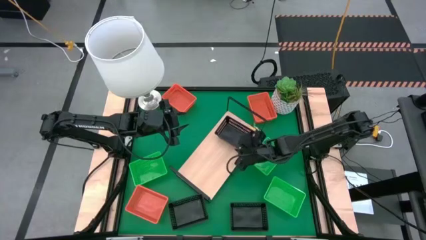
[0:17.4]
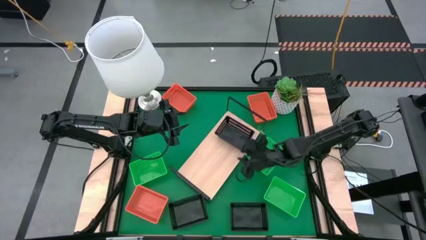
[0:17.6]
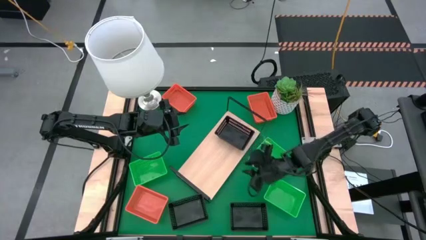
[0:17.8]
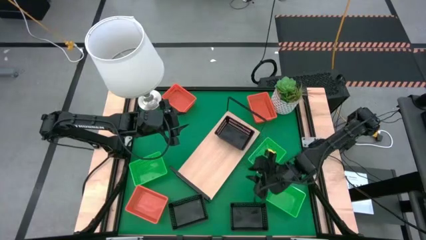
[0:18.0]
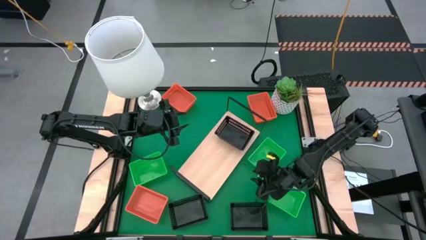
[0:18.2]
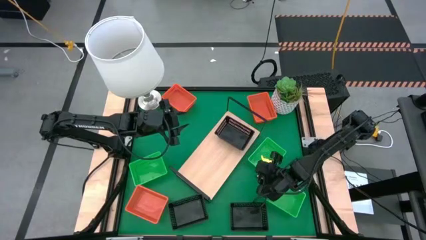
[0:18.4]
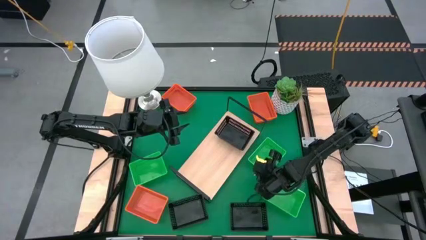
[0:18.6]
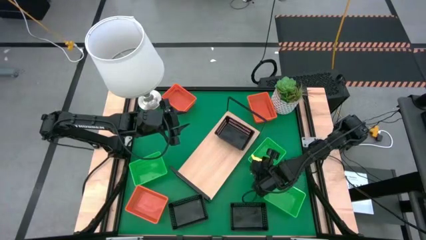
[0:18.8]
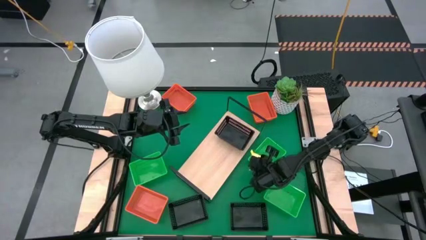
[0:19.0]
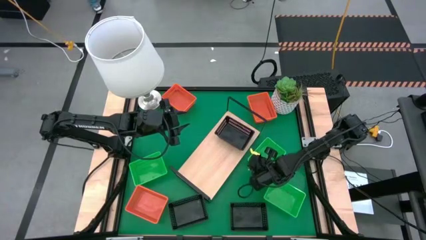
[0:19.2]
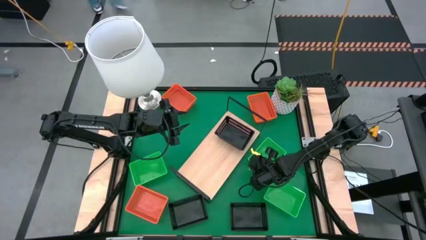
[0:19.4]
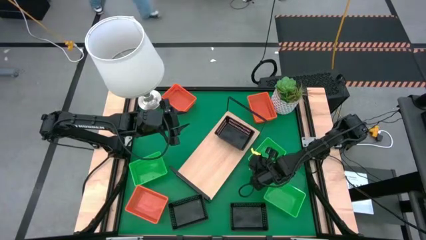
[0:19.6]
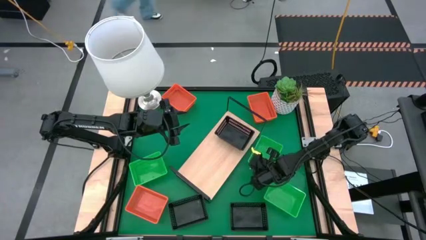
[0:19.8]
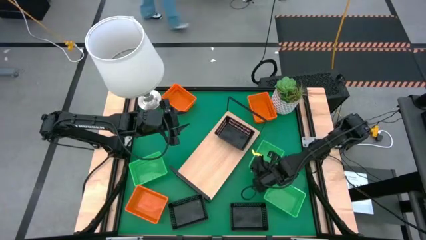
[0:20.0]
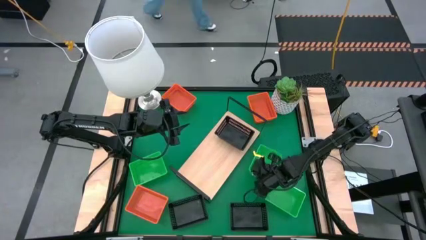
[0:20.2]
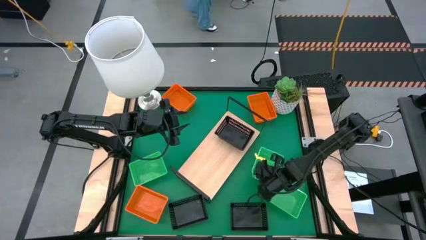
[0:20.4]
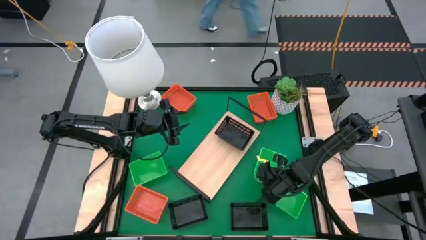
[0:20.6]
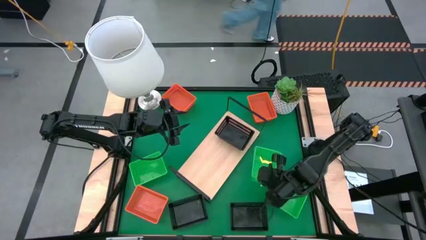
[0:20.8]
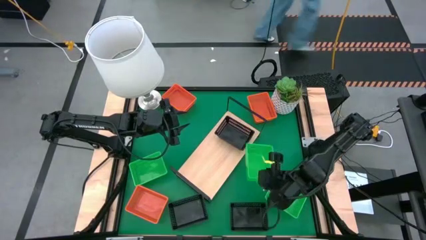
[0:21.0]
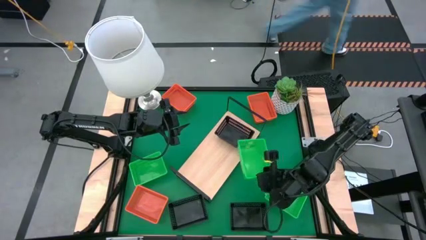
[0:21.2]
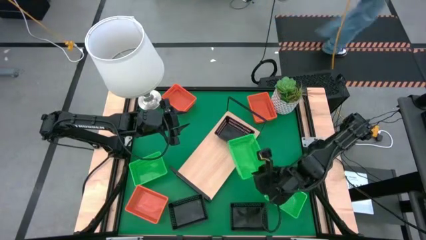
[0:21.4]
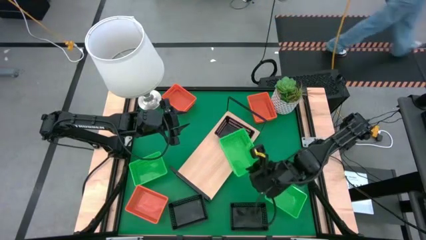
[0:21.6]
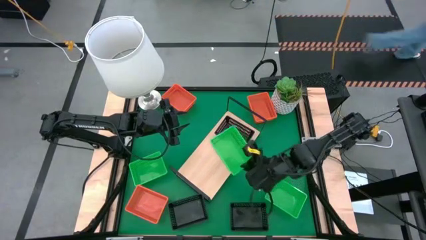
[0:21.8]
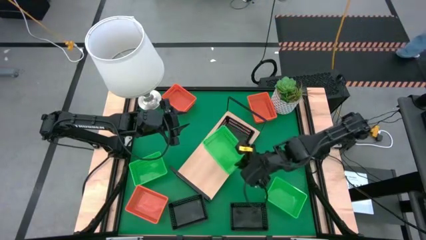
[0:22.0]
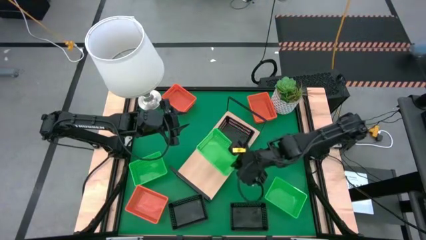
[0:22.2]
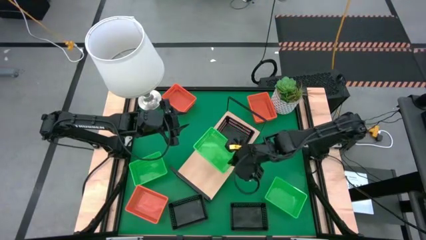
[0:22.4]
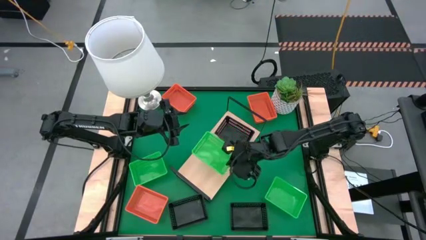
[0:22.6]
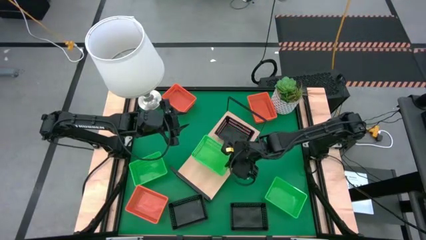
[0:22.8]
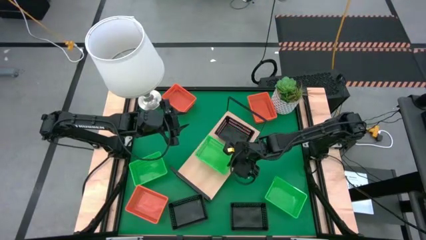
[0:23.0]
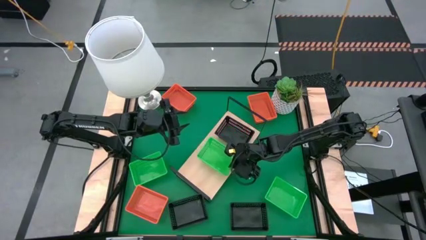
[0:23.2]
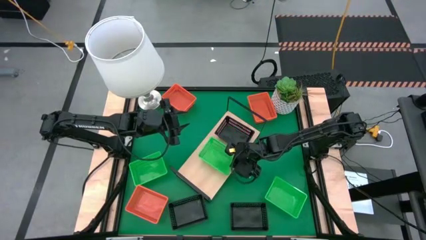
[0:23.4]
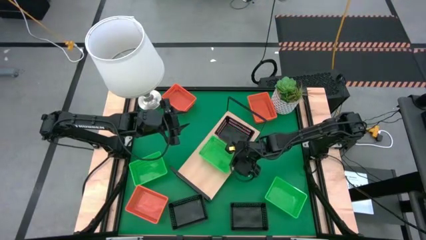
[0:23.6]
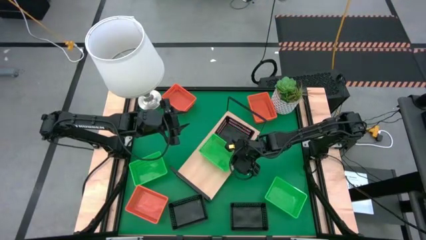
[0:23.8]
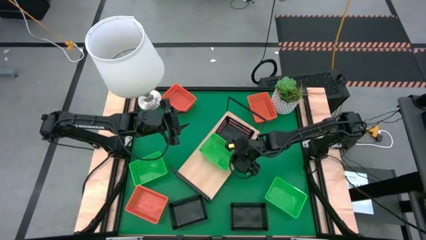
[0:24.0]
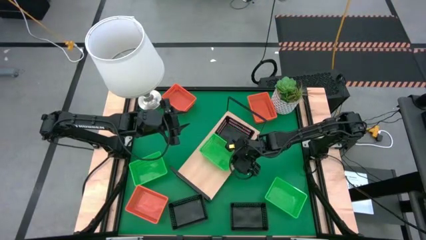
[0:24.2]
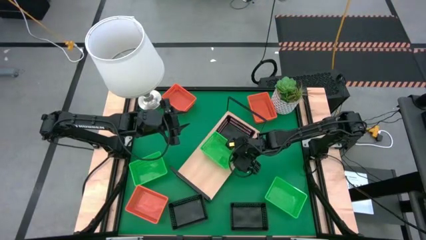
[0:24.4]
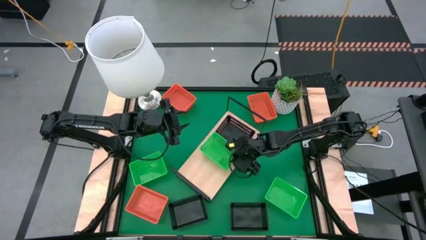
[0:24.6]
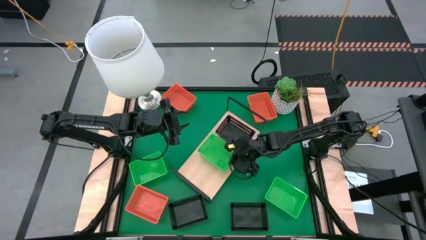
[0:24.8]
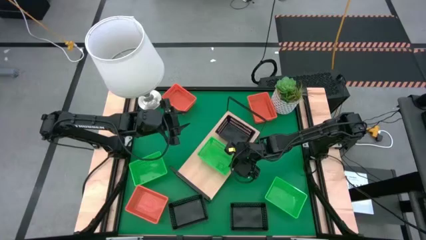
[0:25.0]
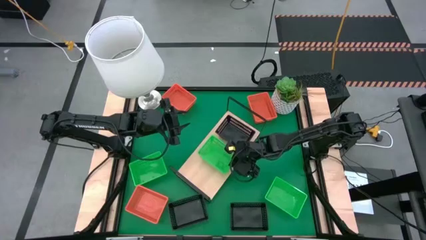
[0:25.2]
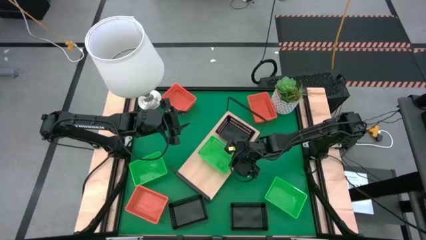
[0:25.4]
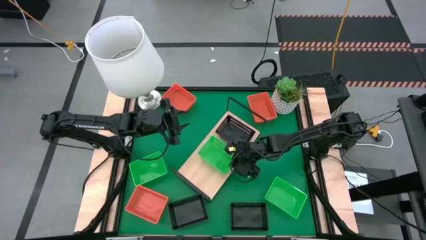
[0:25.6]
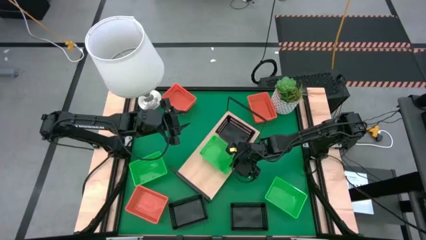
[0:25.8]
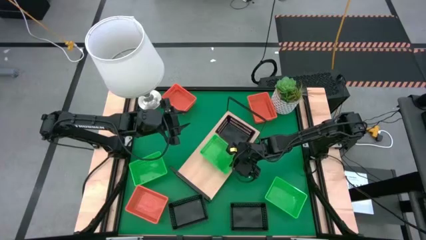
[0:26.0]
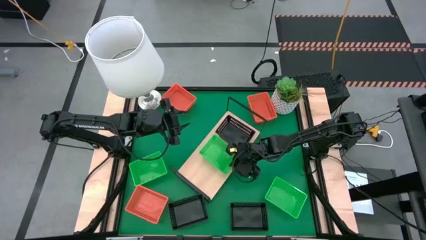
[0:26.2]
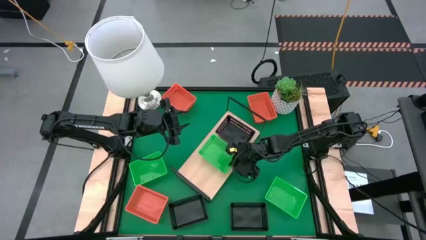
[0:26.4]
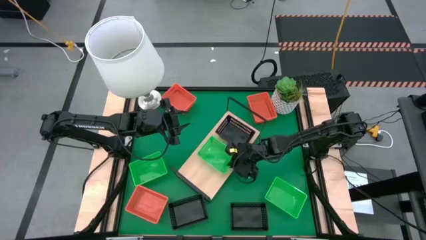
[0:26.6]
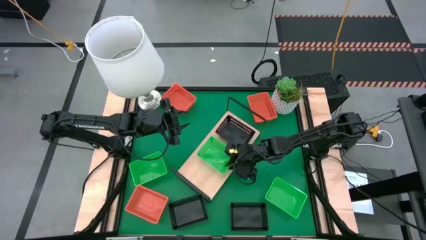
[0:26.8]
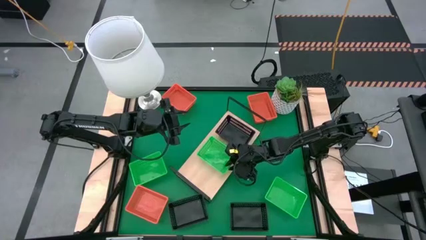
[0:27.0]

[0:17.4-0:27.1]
Task: Stack baskets on shelf by color
Put the top right green bin on the shelf

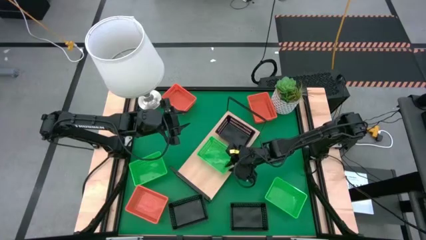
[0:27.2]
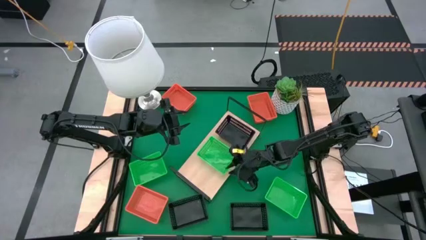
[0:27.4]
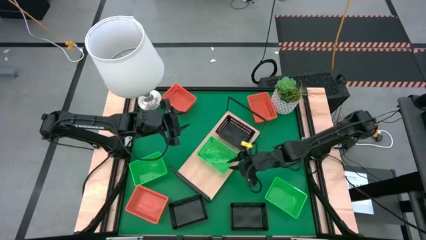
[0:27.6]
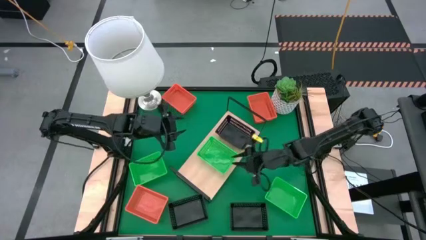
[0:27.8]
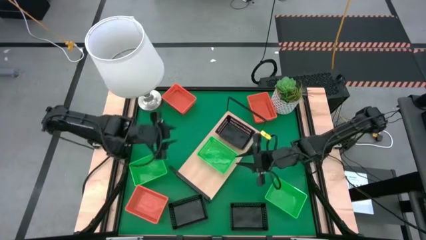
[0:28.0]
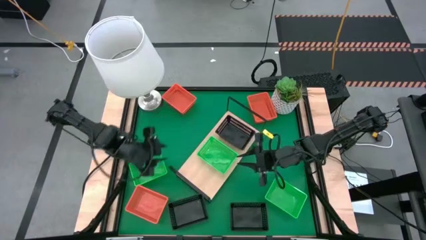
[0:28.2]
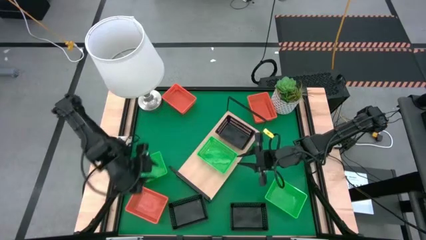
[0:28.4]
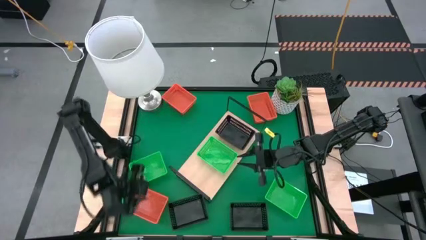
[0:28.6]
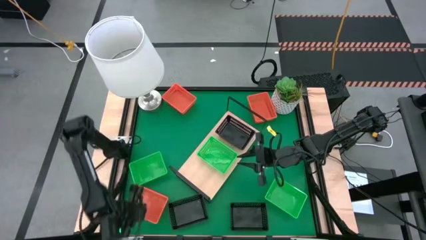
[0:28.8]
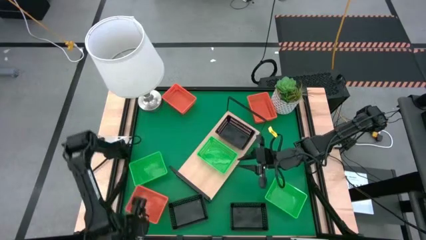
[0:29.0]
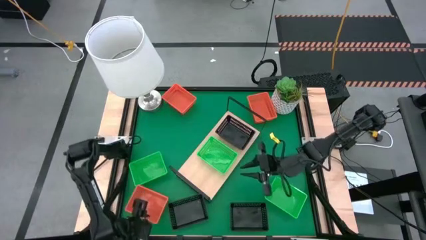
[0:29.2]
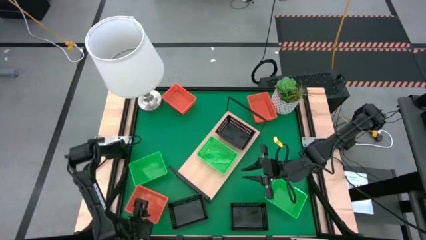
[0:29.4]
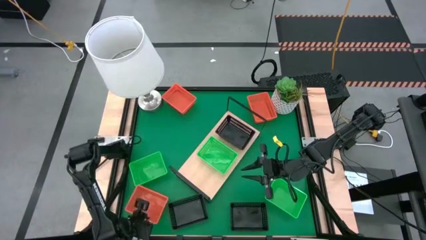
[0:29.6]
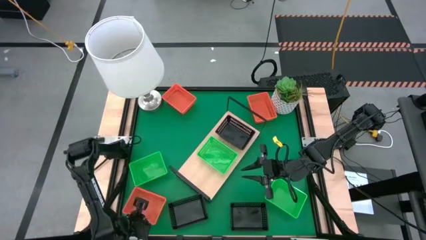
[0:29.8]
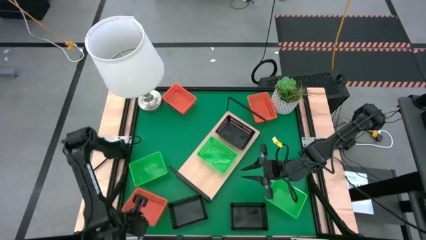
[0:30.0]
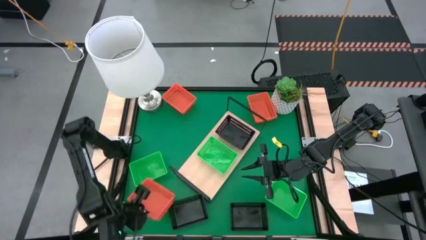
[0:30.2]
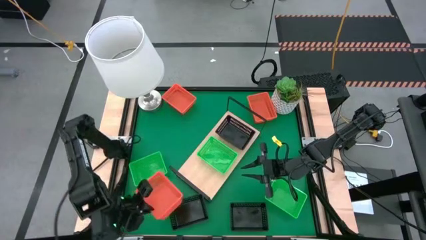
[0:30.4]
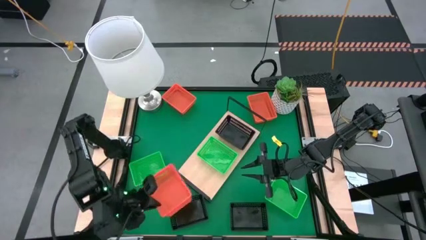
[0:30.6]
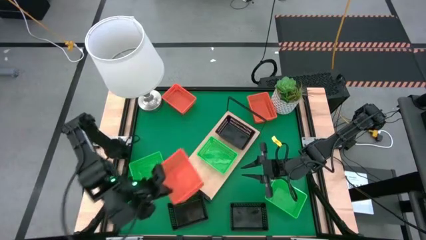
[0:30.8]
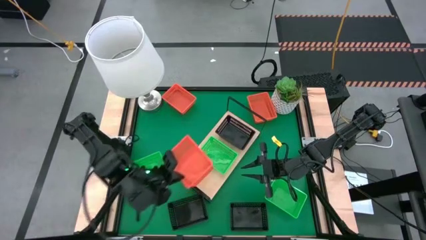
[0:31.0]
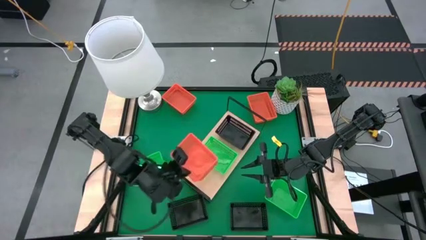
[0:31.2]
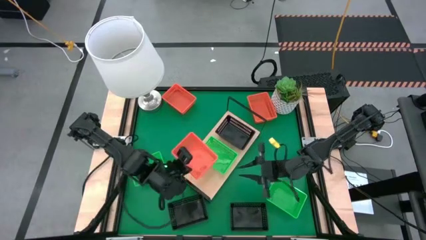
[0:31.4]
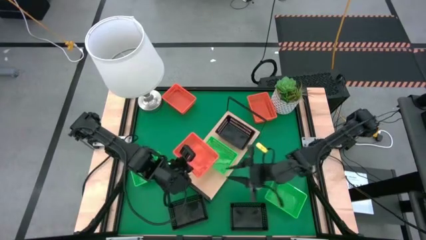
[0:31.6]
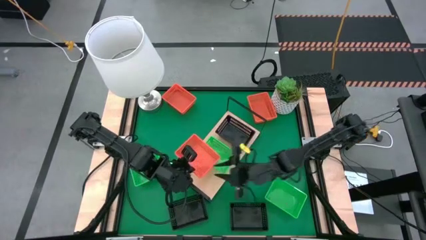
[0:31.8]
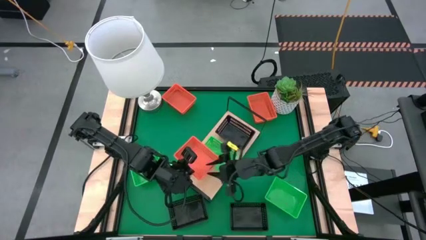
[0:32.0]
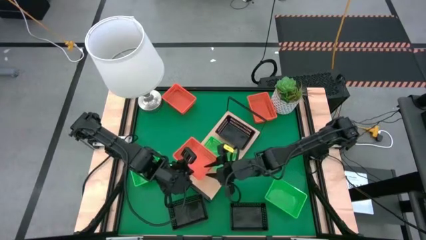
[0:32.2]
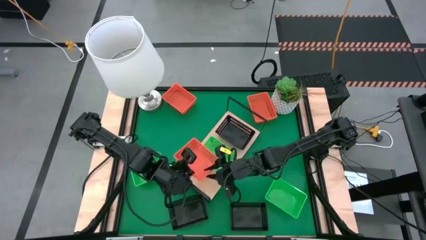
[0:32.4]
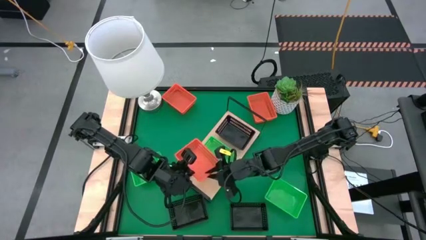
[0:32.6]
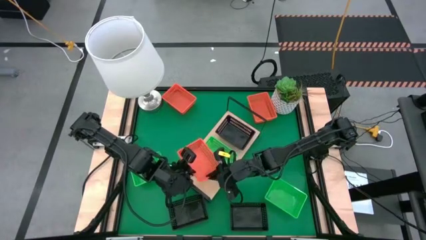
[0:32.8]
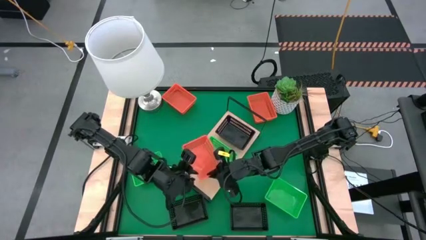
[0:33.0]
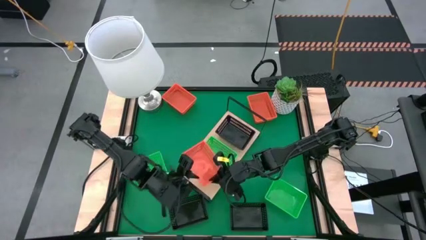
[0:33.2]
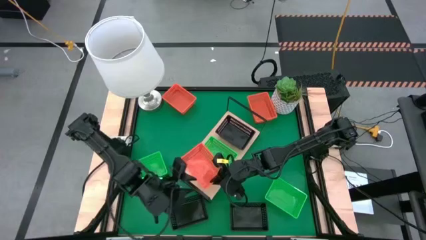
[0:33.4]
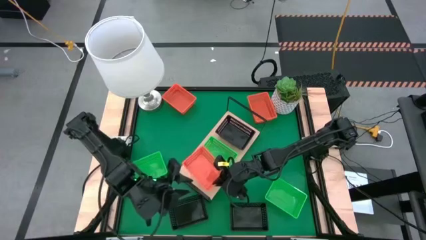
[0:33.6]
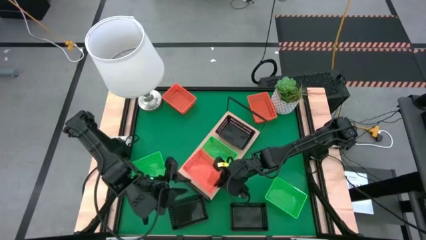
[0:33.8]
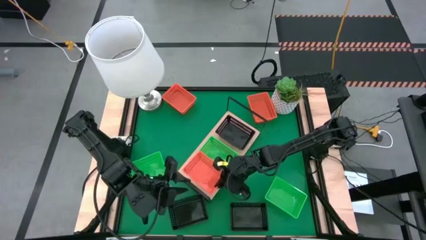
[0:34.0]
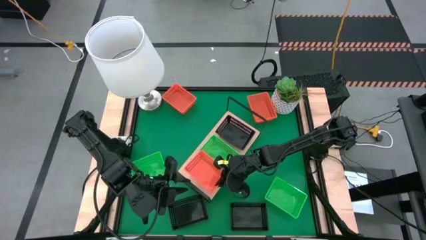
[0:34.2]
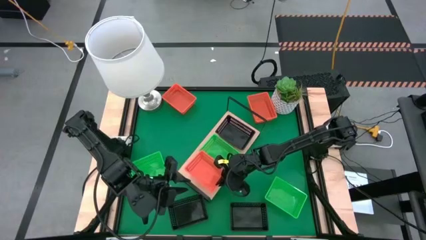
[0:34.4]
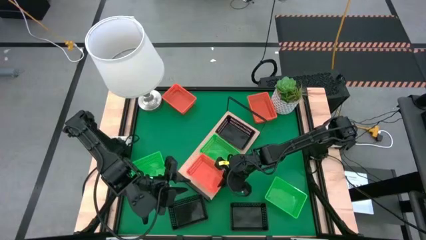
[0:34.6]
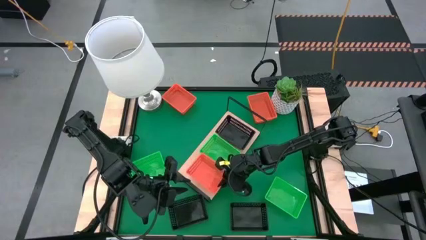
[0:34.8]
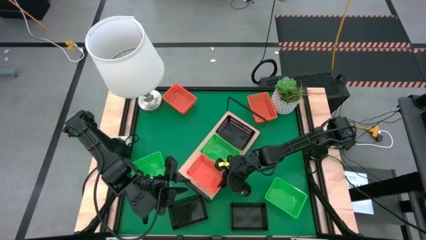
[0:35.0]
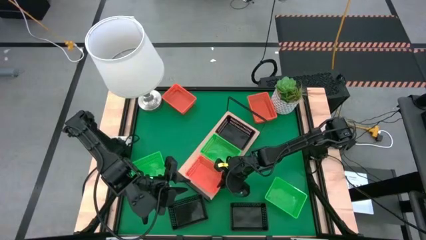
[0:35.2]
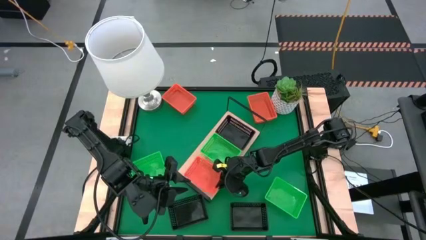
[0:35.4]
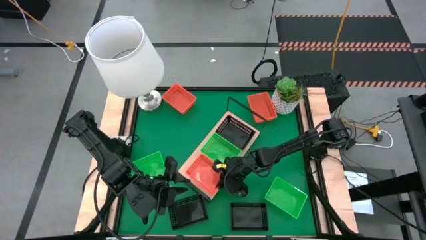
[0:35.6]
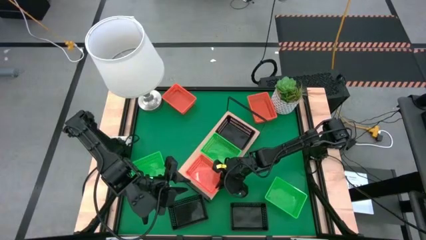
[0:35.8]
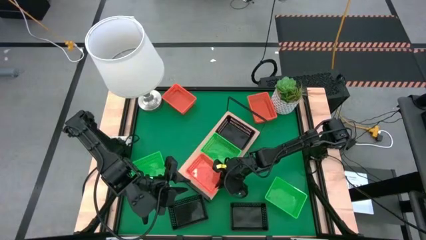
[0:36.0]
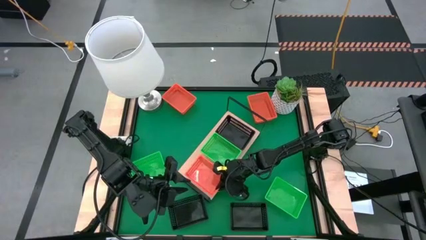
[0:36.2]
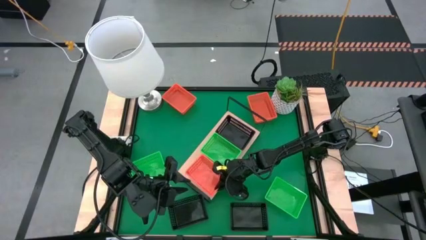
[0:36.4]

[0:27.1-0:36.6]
Put the bottom orange bin on the shelf
